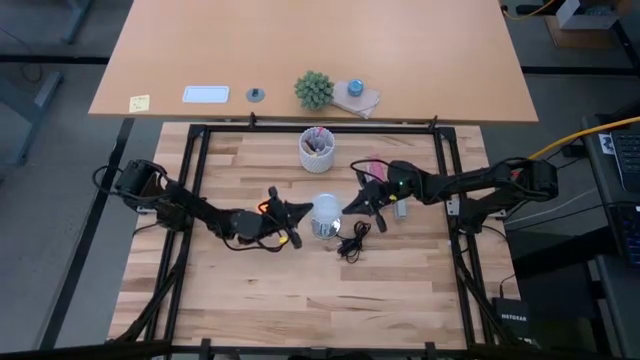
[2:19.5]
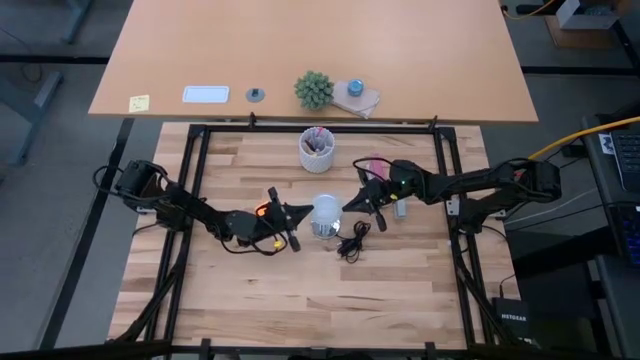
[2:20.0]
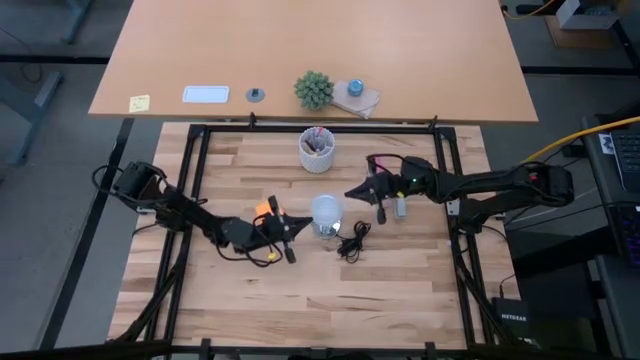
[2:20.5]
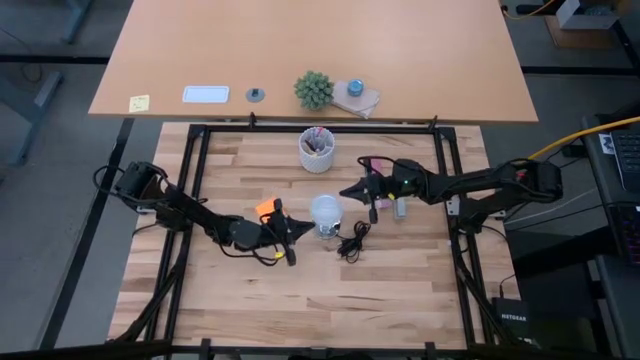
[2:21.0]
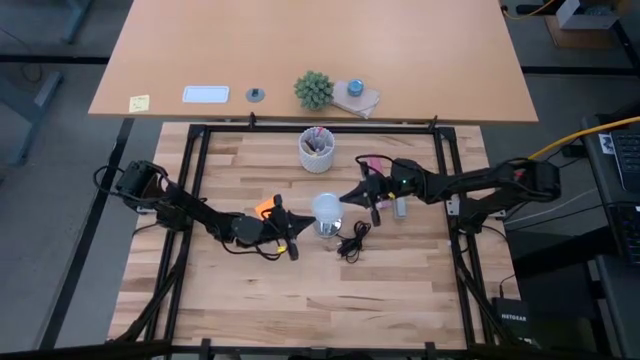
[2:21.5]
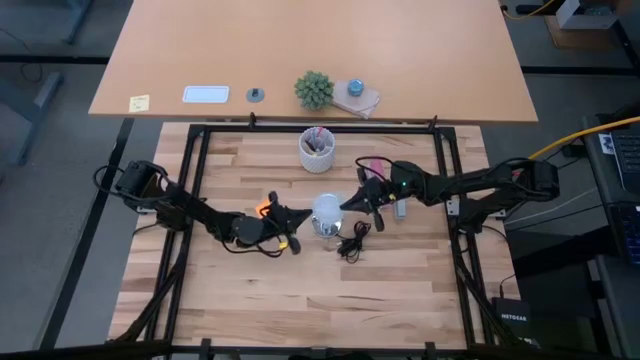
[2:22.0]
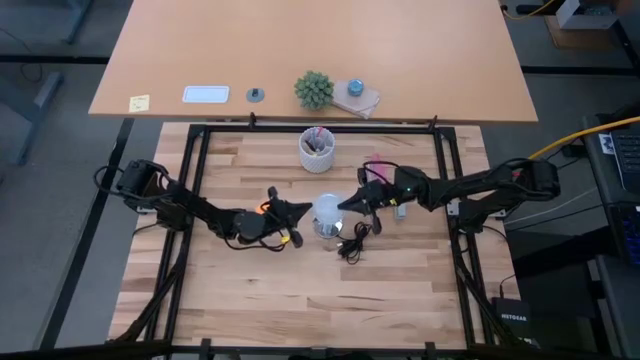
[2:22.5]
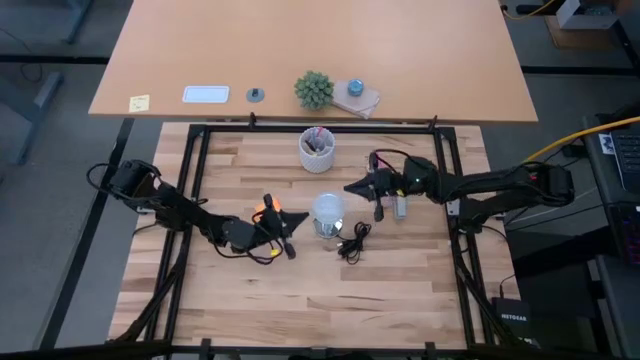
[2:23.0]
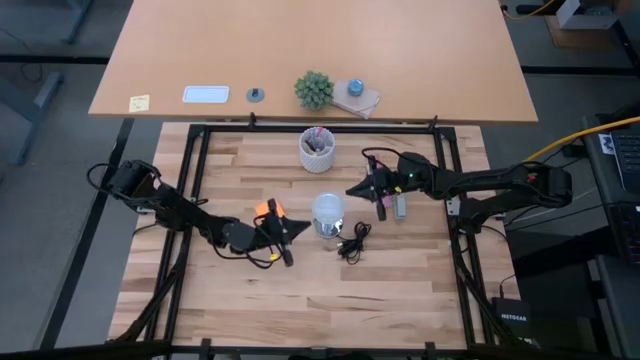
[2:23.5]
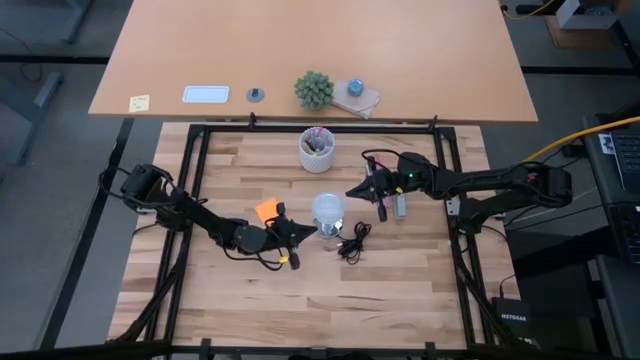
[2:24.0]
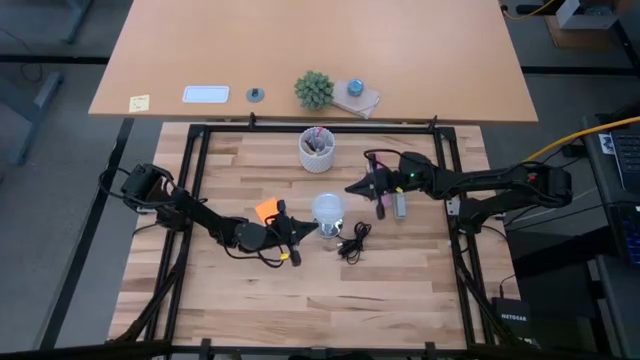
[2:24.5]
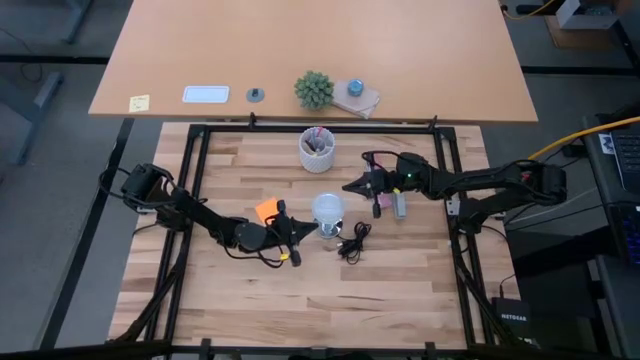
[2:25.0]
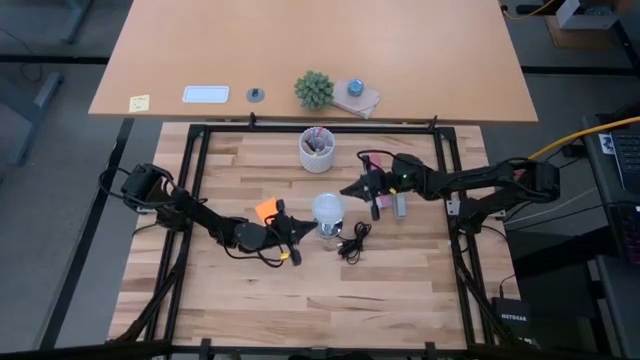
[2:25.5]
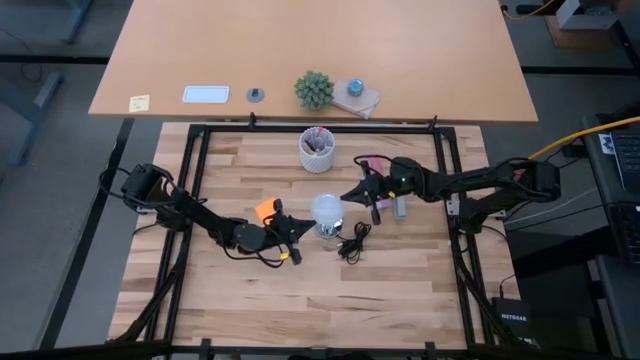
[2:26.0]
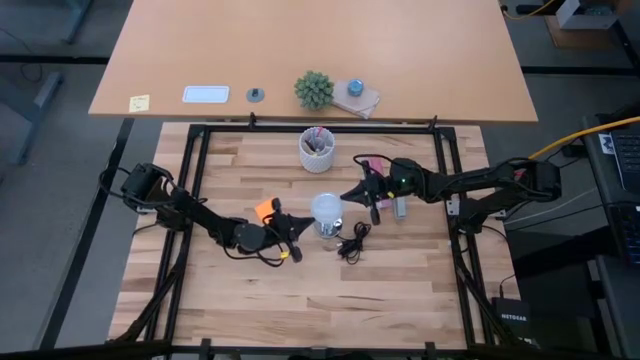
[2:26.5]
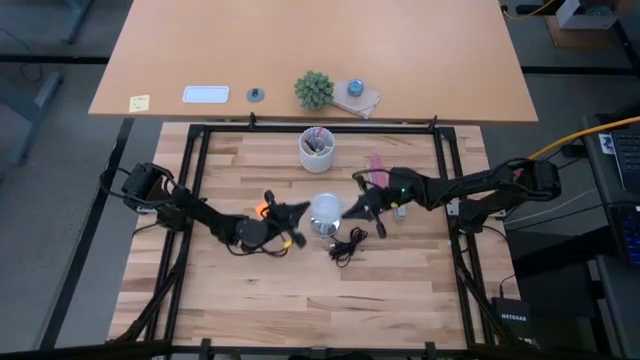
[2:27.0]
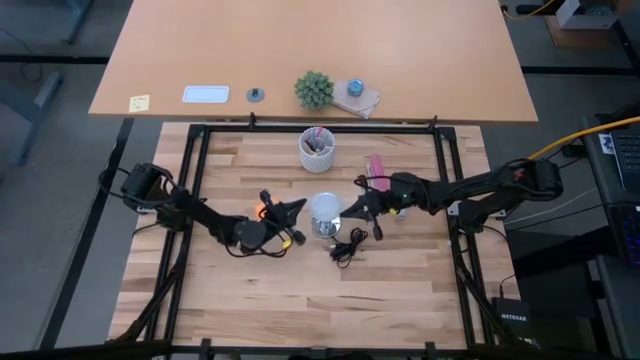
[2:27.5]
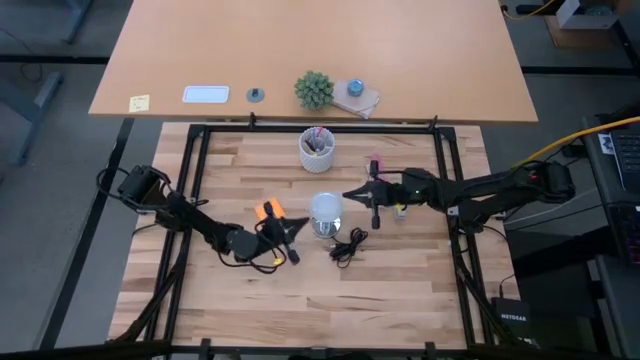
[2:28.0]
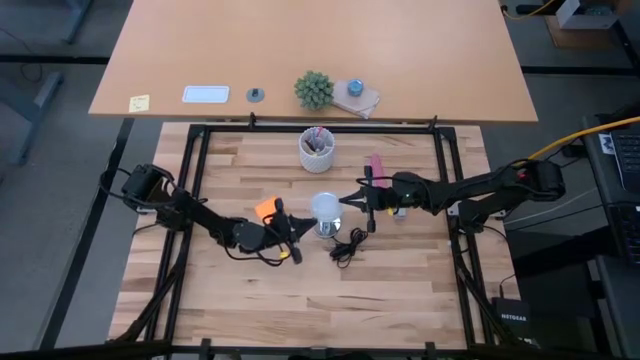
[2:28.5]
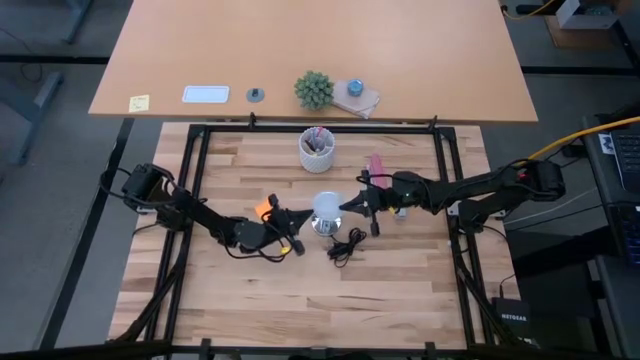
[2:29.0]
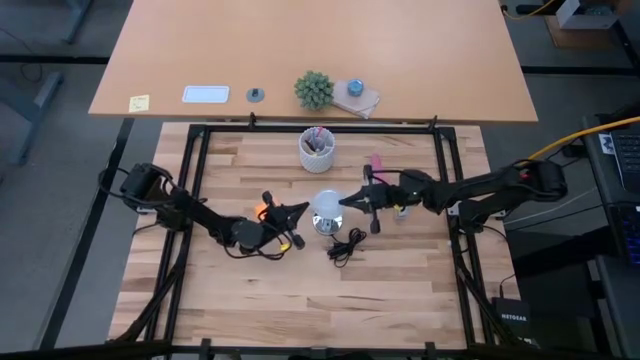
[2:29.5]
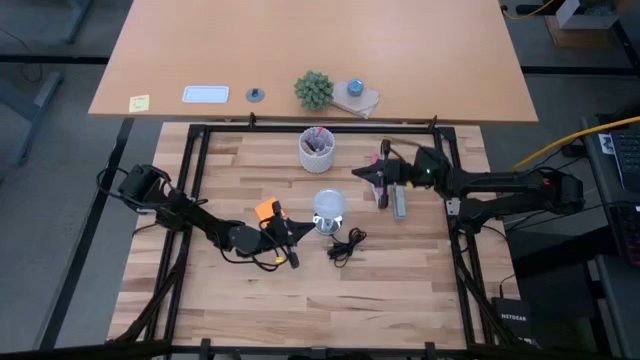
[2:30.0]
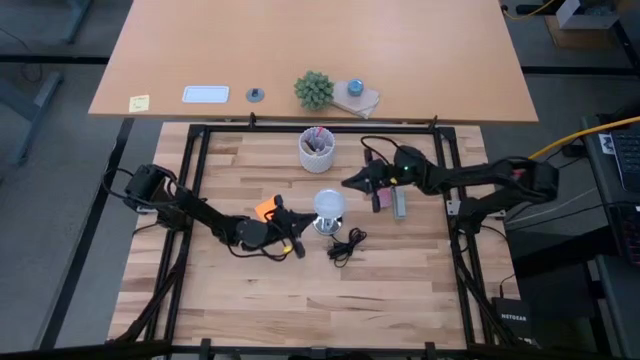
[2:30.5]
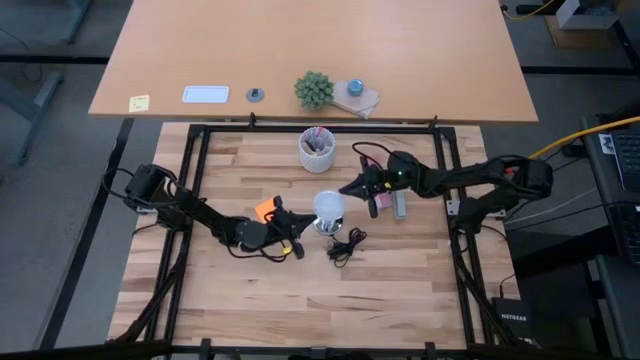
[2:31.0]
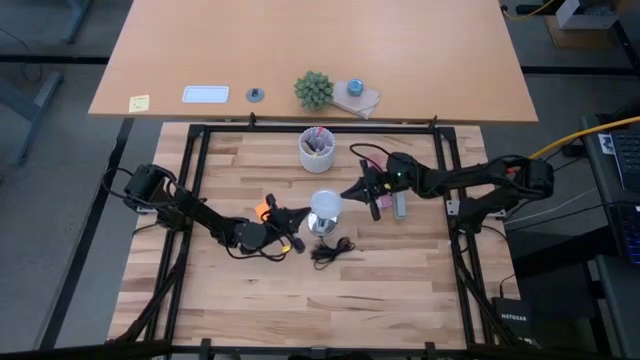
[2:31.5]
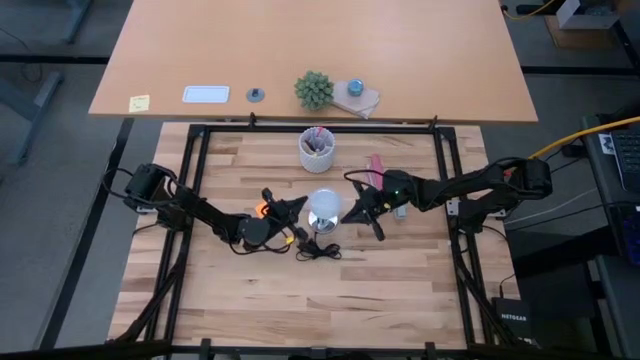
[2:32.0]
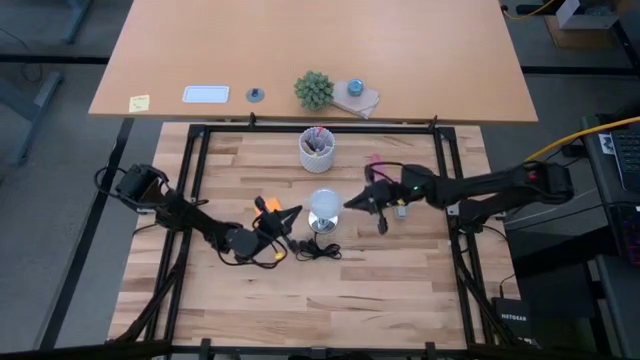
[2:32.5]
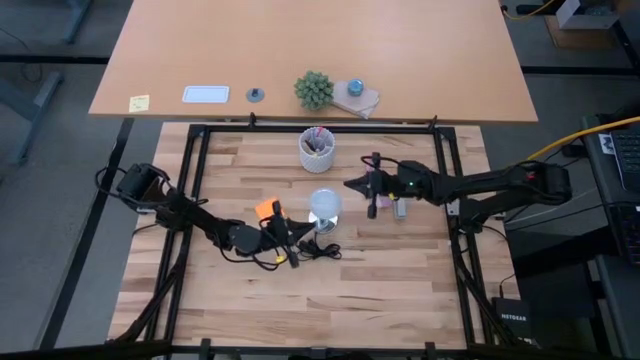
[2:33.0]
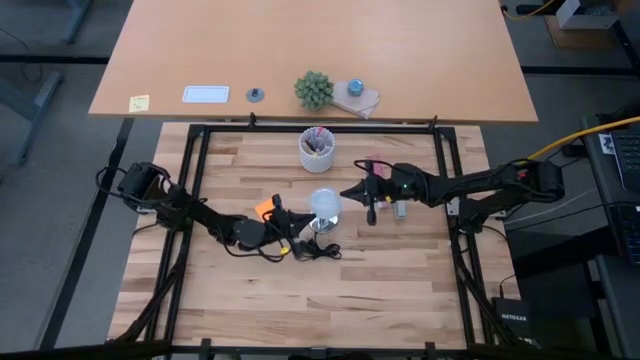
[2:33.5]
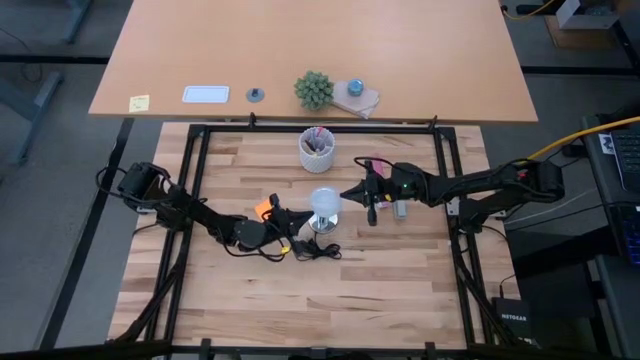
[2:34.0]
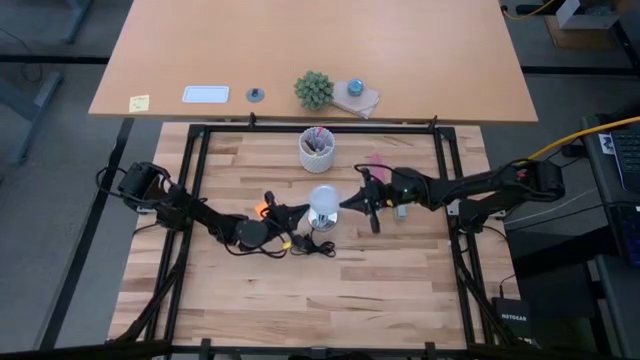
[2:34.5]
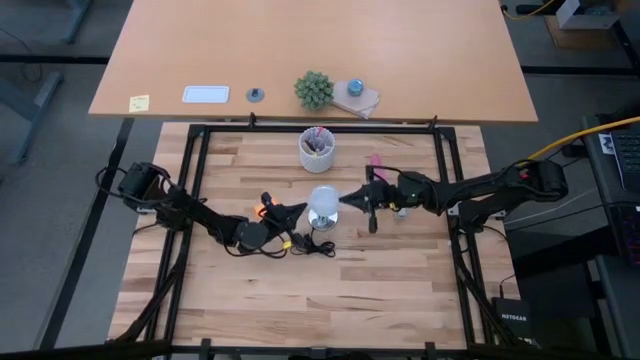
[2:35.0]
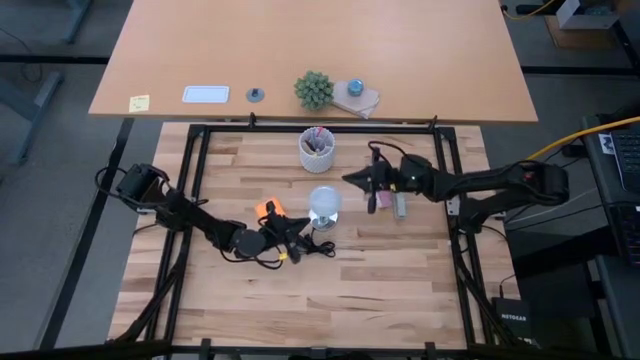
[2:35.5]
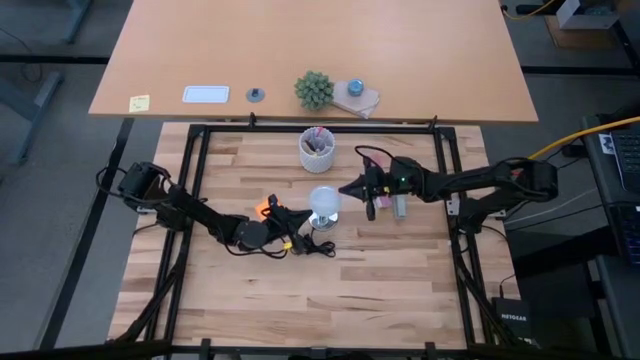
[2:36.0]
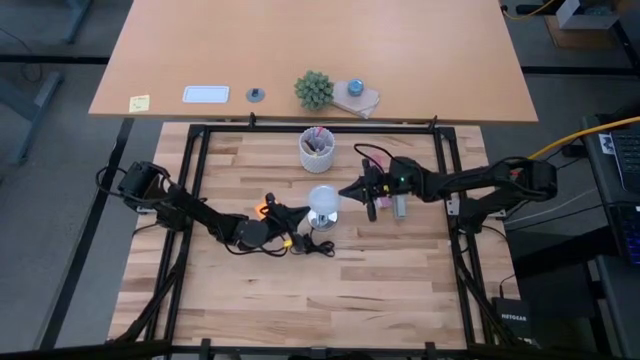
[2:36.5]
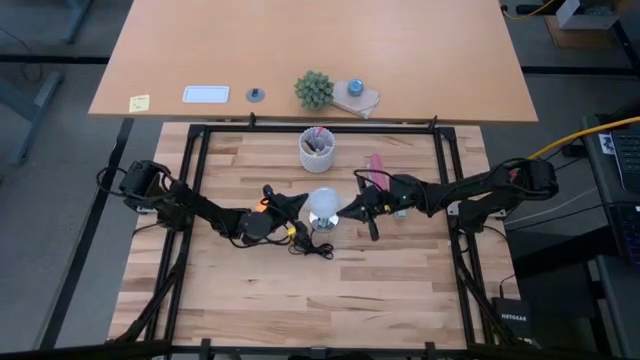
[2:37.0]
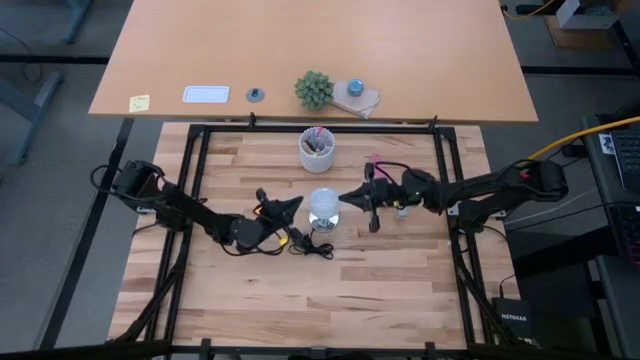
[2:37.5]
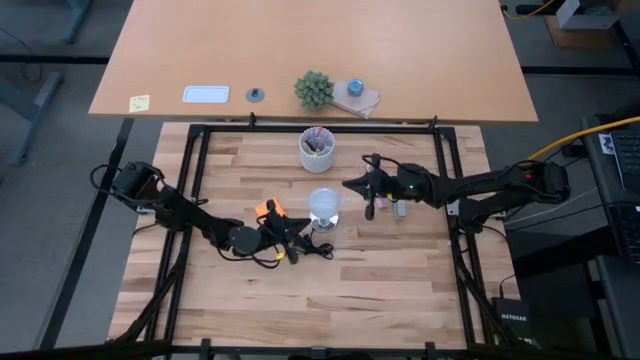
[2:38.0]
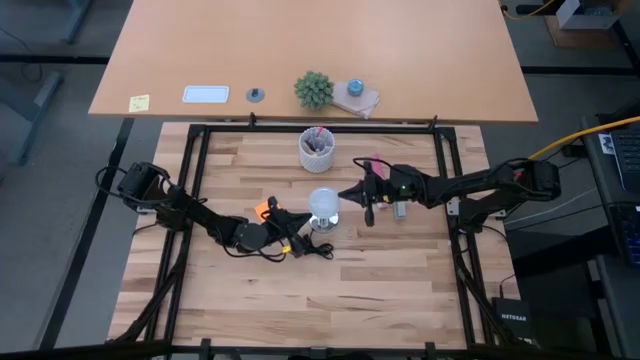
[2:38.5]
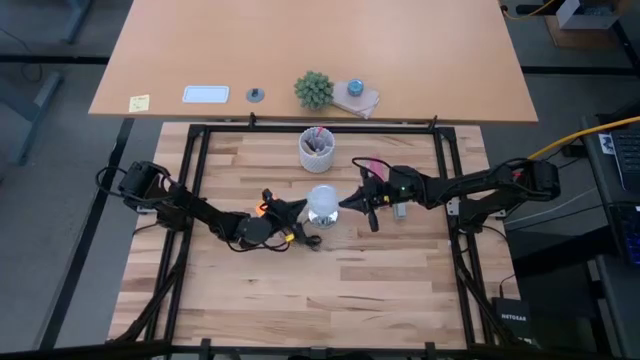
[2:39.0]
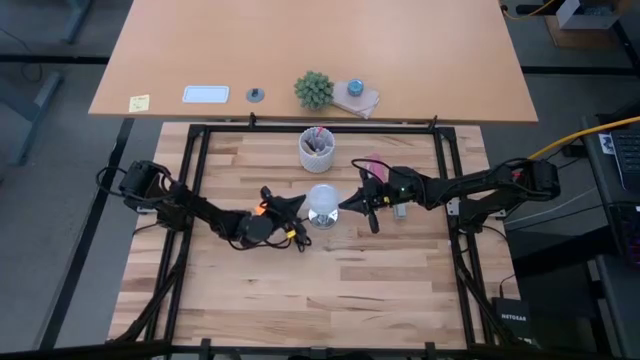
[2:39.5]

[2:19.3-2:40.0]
Task: Screw lightbulb
Insert the lightbulb into the lamp
